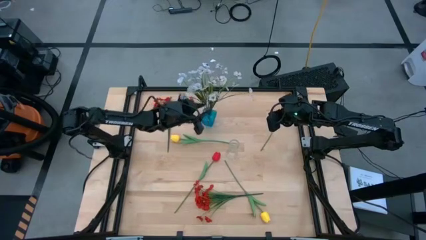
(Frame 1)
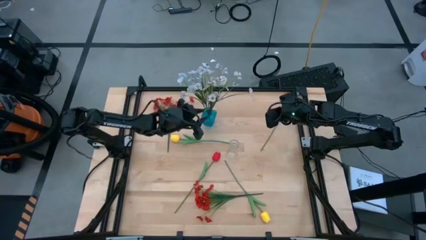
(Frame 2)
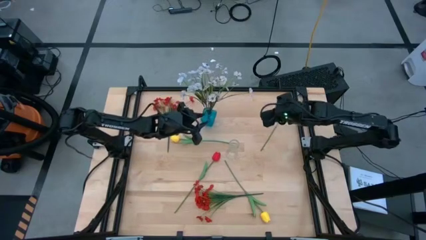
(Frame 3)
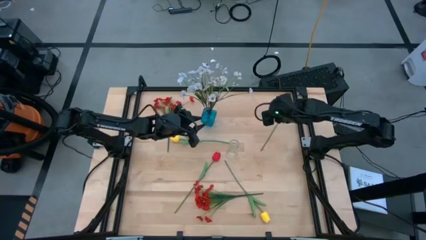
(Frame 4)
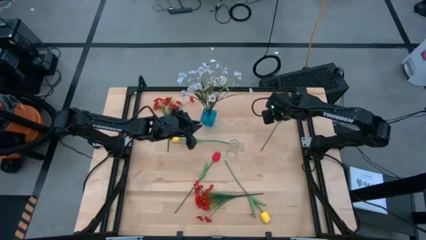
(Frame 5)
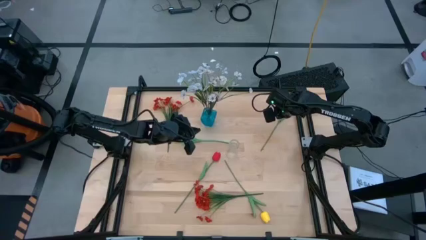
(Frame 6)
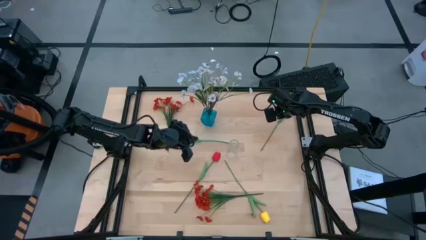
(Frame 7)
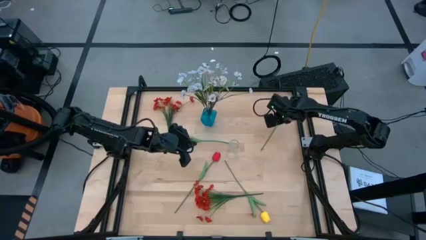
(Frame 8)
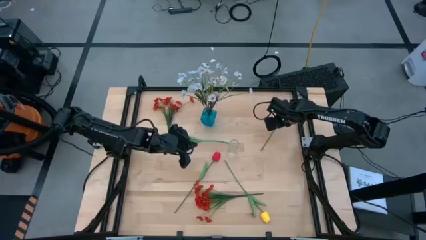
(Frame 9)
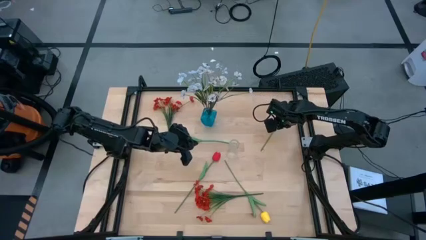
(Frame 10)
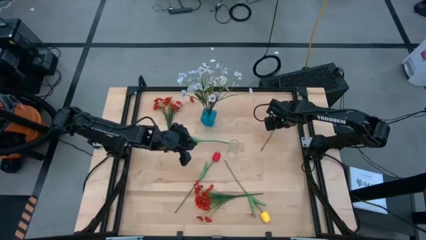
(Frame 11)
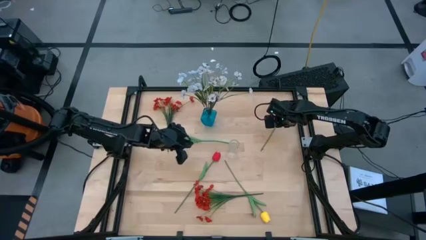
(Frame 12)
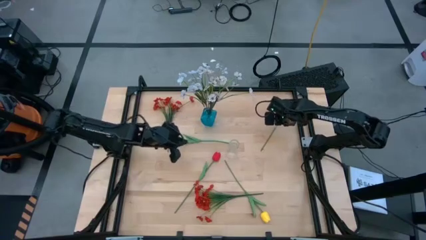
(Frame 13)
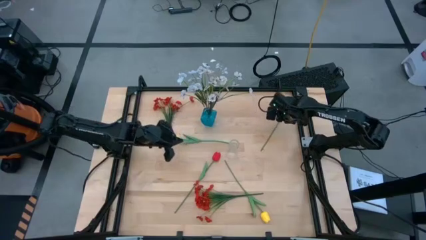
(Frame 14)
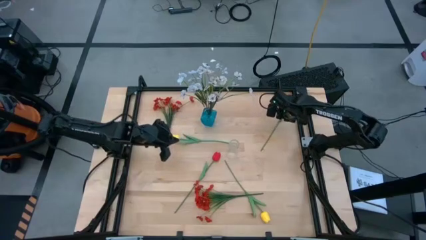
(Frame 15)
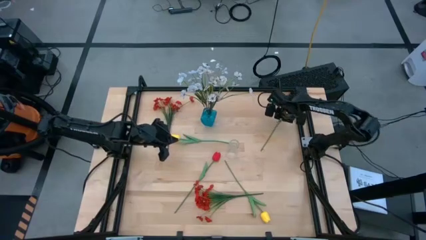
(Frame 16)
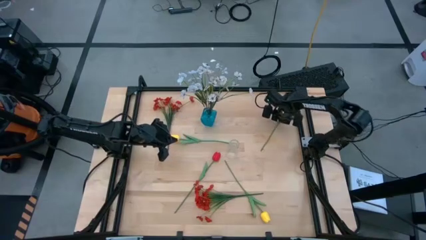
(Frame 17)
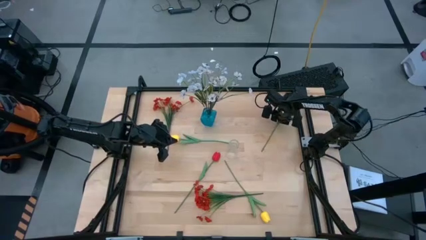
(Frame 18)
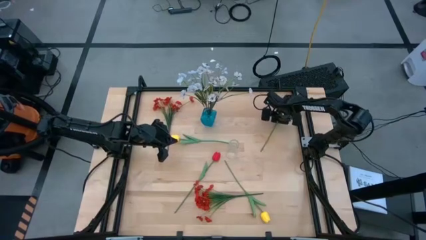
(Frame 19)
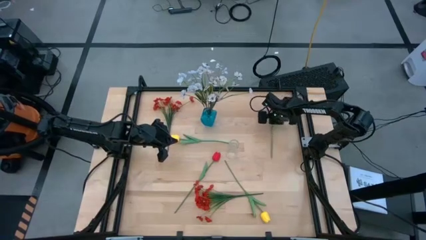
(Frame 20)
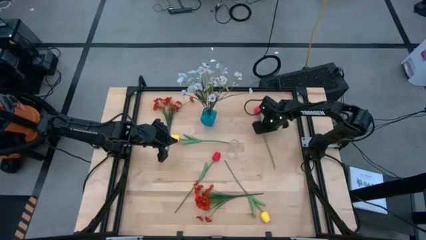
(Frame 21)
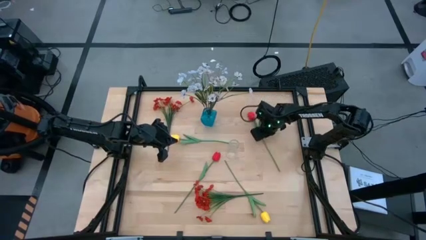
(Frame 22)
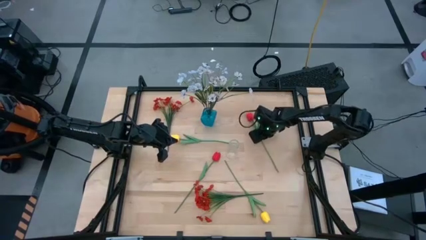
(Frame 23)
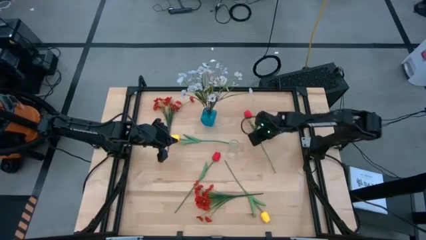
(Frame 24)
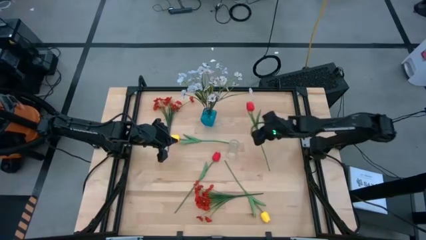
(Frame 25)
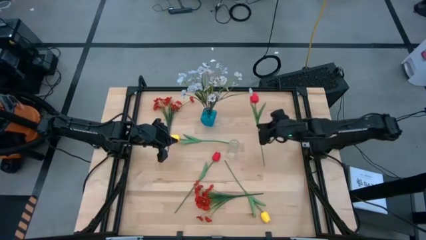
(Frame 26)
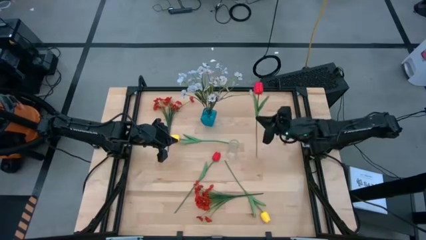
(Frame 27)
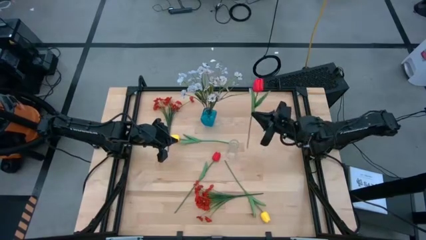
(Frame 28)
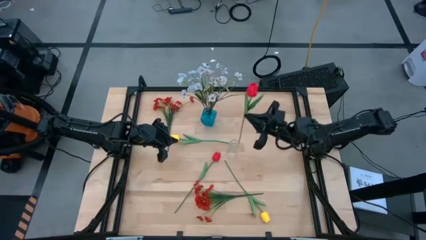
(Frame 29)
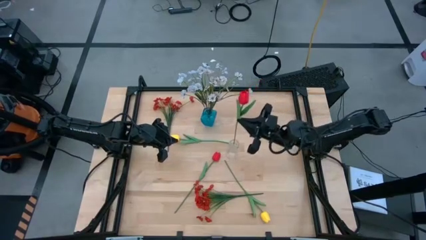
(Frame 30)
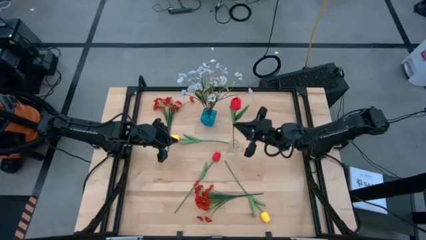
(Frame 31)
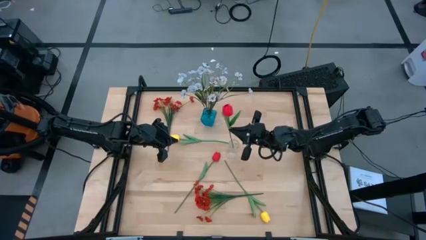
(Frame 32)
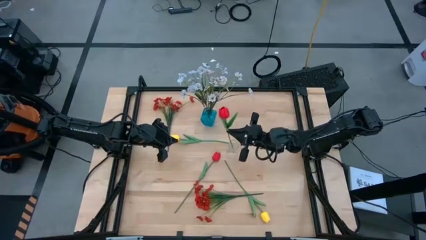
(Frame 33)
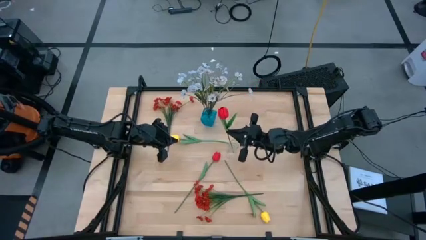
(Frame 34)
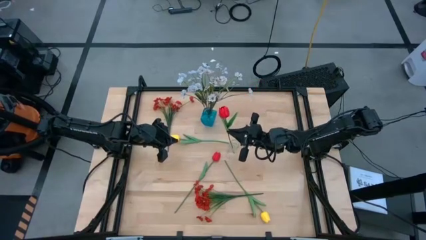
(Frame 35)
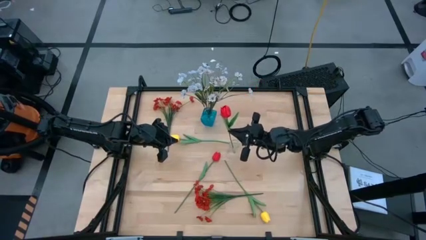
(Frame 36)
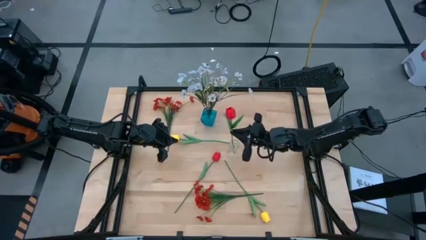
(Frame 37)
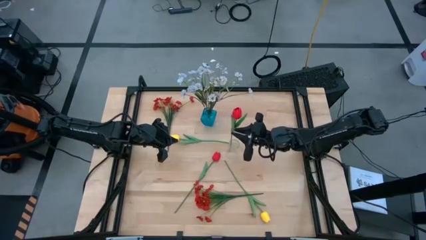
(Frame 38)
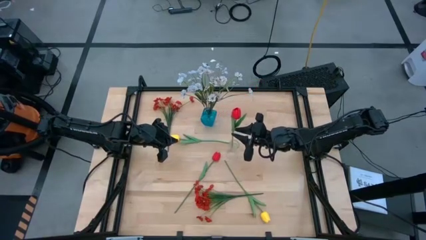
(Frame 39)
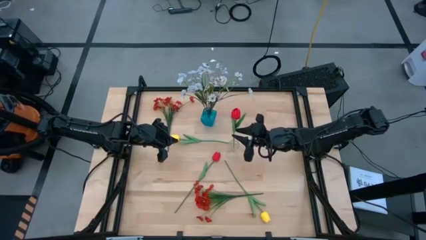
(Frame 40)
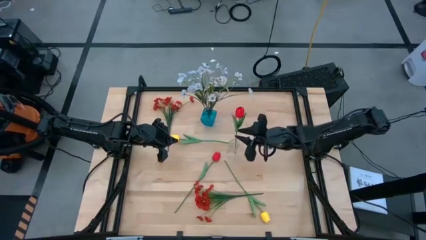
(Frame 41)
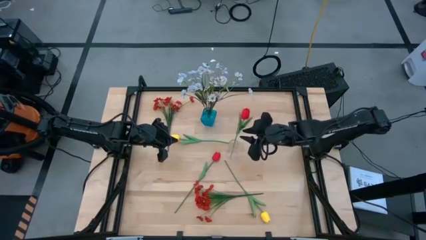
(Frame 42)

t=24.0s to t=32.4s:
Task: Sort flowers into vase by color
Put the top red tulip into the transparent vase

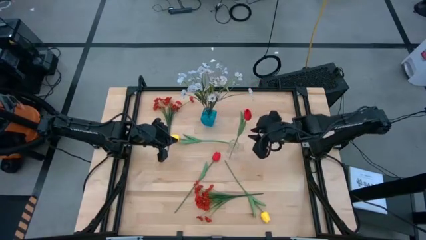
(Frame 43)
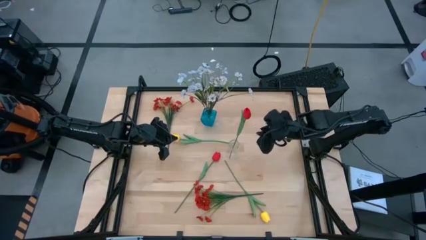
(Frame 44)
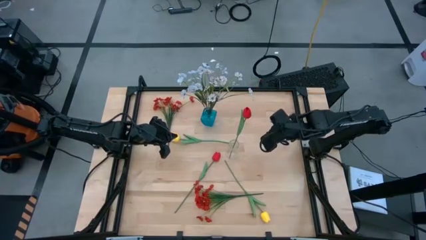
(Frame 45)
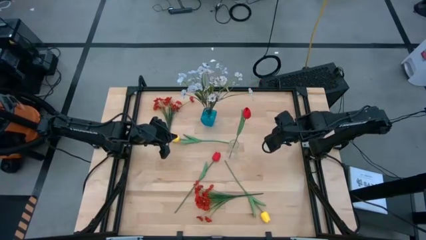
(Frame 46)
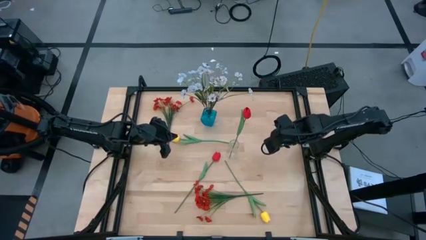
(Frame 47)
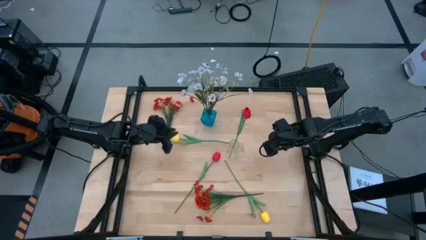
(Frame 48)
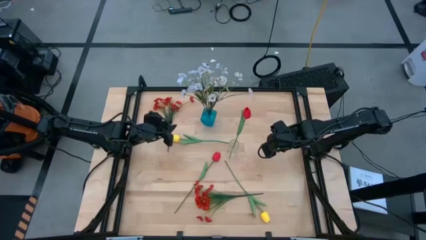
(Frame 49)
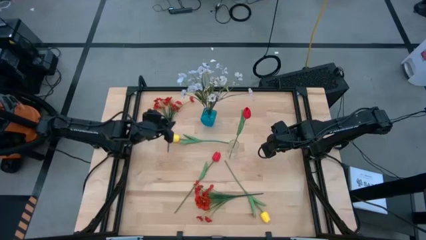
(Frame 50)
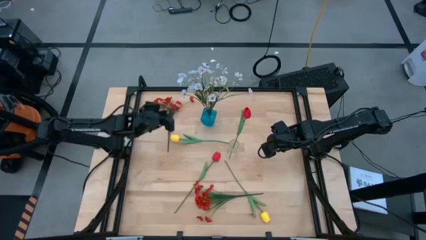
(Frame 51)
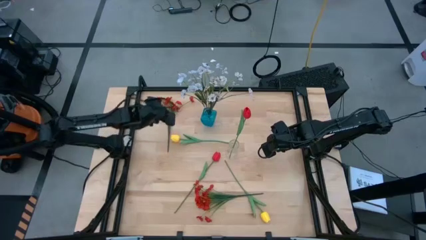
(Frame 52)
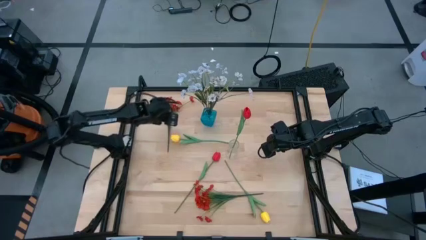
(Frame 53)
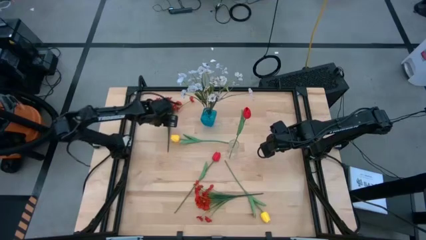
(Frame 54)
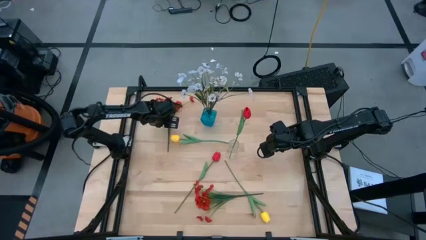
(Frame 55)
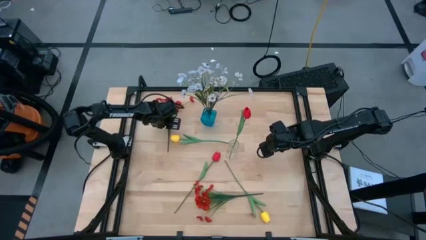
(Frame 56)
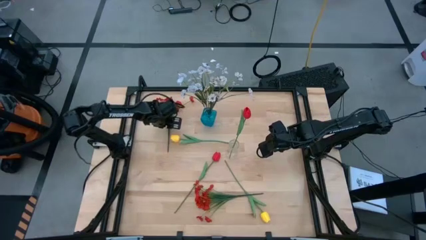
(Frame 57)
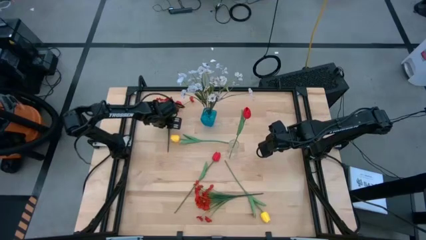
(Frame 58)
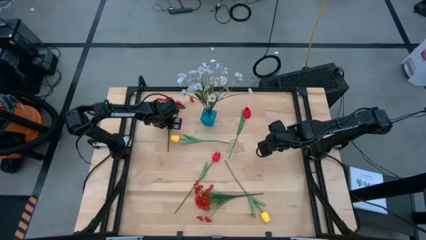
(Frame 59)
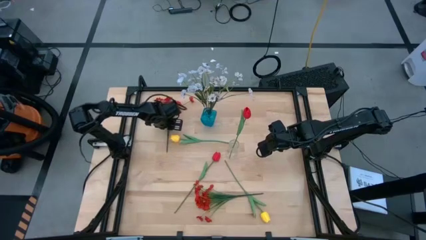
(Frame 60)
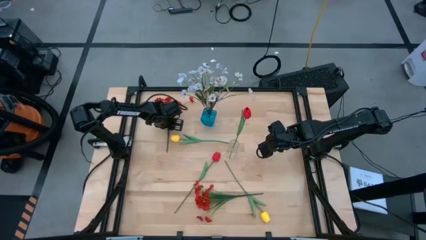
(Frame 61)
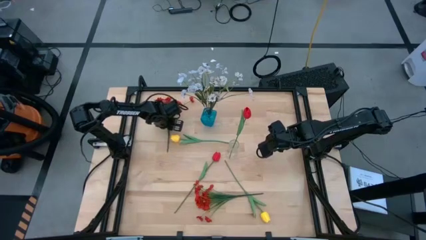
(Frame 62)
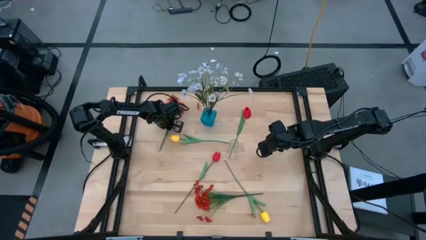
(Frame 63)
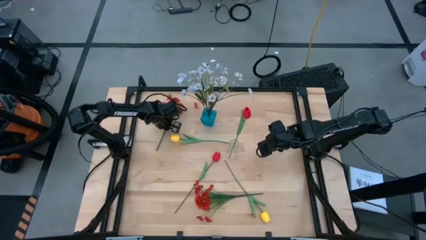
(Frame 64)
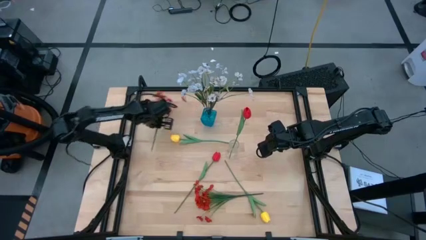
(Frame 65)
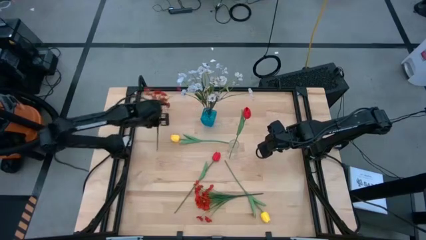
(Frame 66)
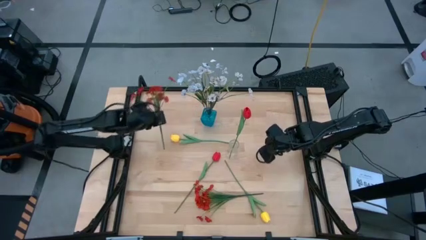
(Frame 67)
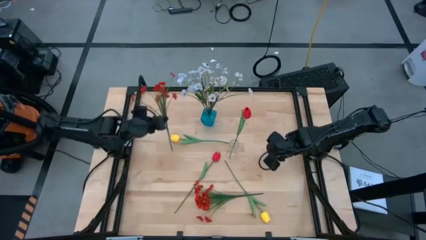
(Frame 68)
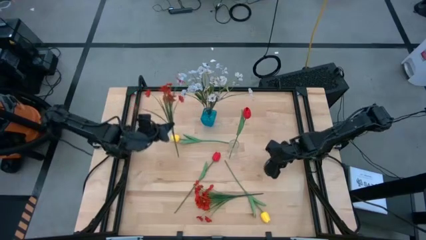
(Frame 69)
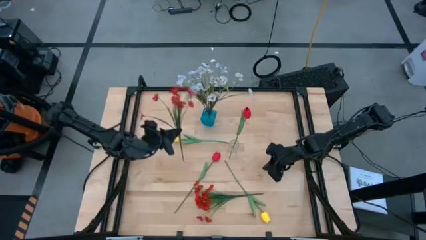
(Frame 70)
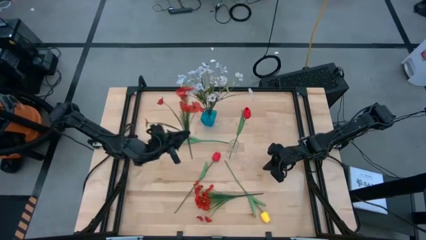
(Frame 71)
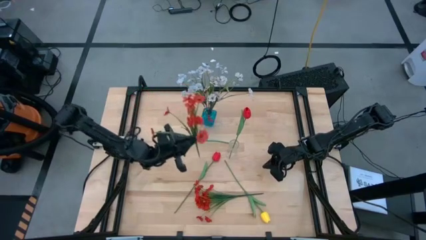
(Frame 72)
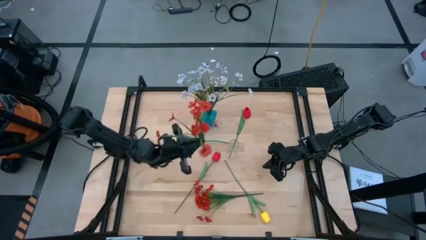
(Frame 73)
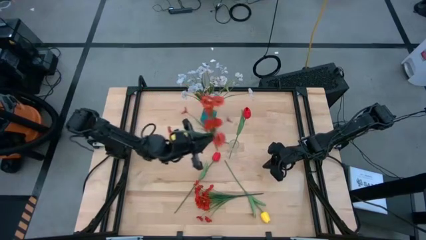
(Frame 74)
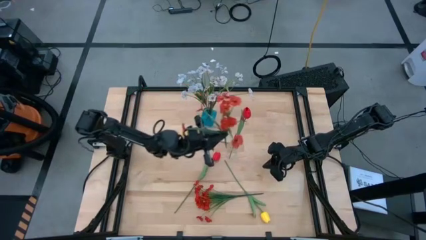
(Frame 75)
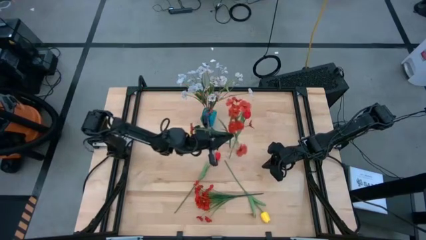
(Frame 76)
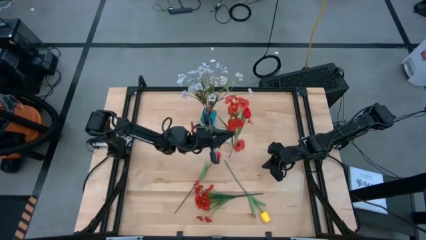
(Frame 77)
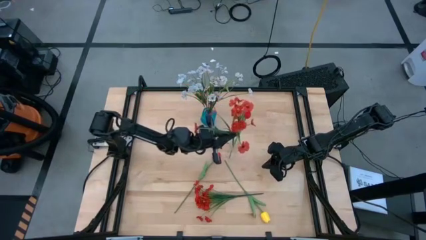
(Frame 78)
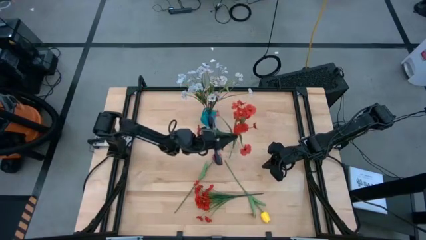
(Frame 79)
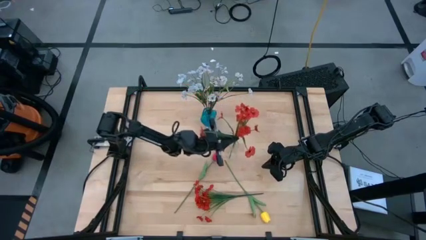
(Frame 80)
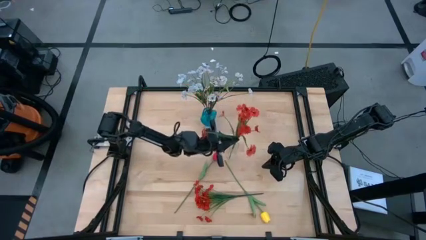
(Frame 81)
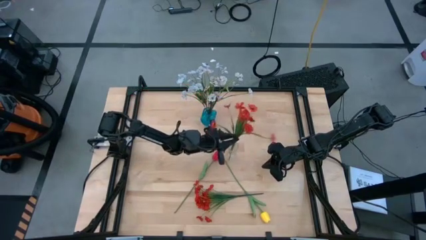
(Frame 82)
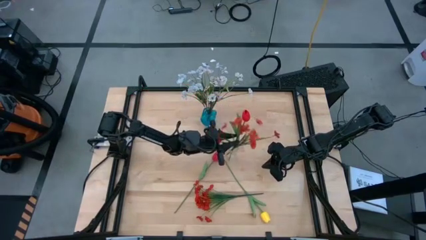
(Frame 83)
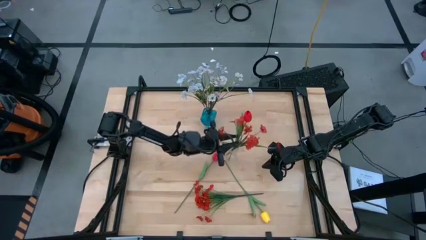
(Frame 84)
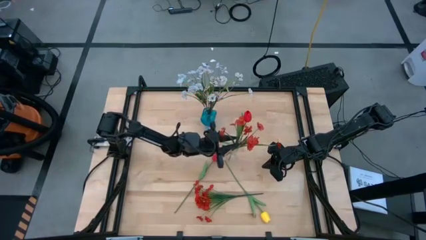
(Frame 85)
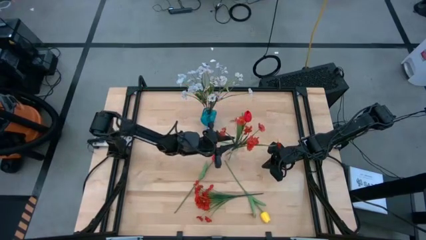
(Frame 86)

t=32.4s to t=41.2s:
Put the top orange flowers into the transparent vase
